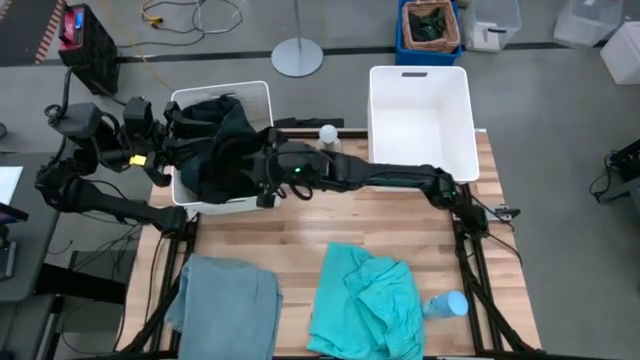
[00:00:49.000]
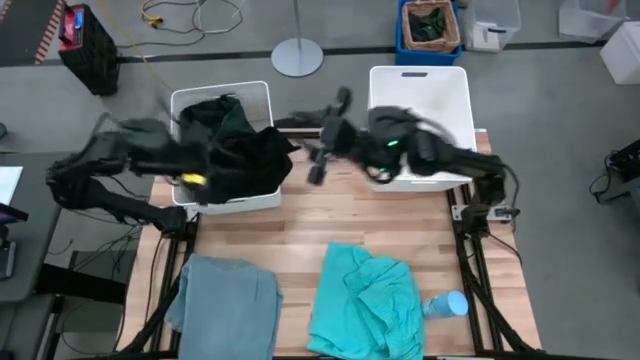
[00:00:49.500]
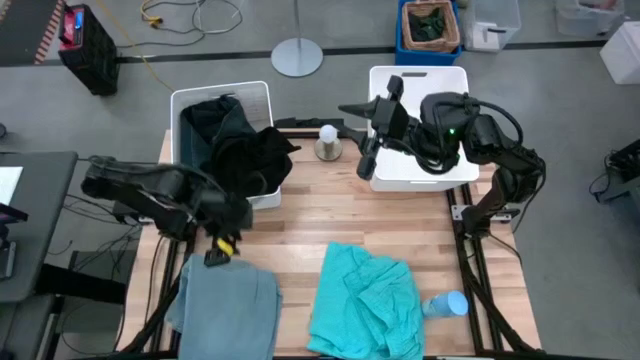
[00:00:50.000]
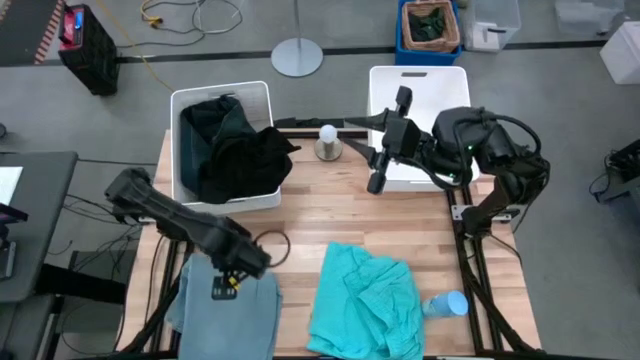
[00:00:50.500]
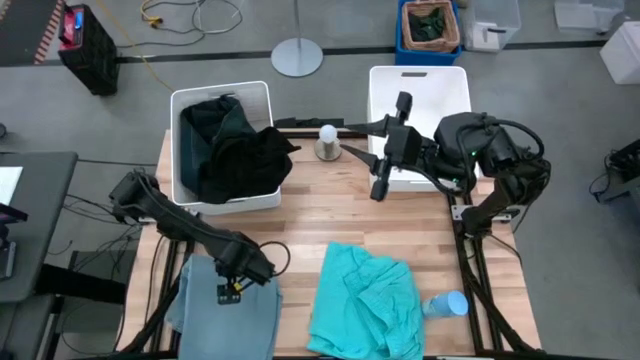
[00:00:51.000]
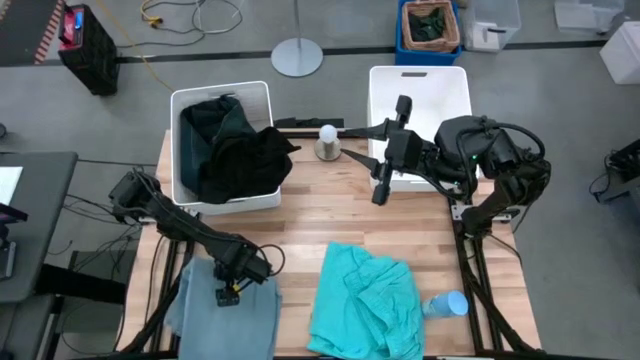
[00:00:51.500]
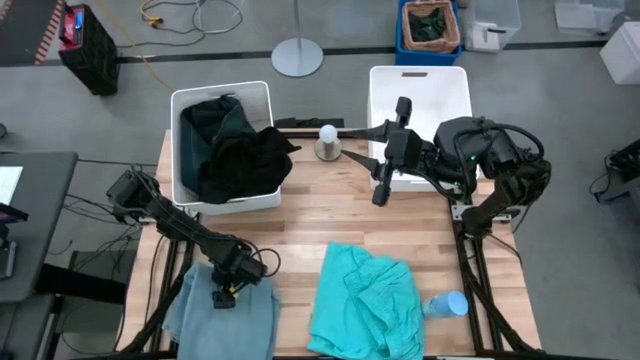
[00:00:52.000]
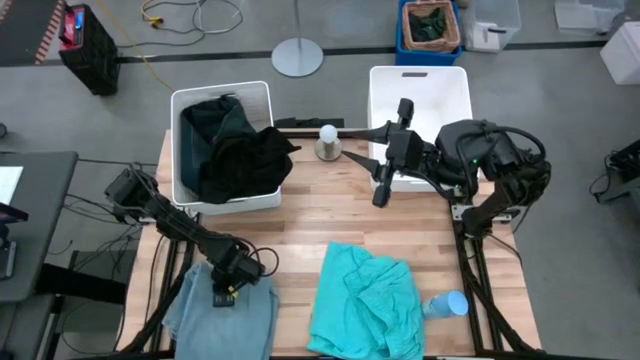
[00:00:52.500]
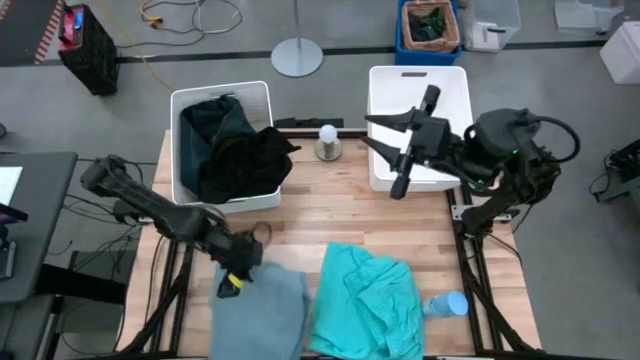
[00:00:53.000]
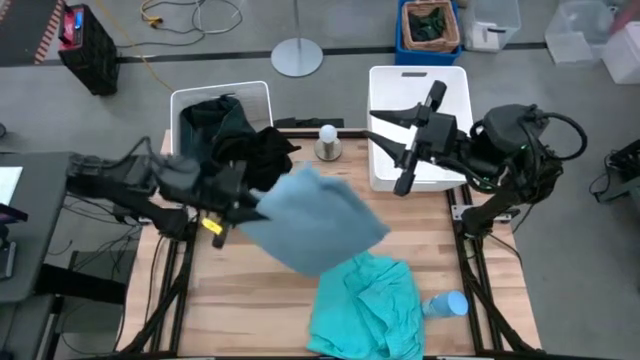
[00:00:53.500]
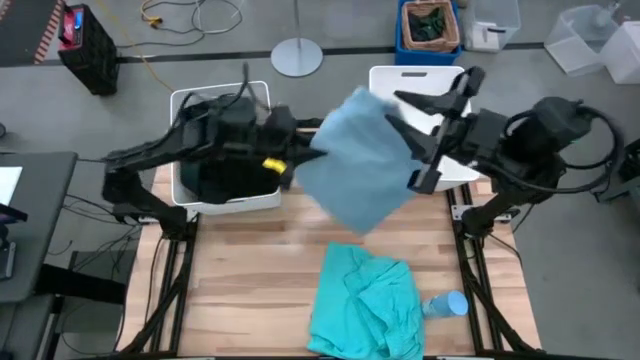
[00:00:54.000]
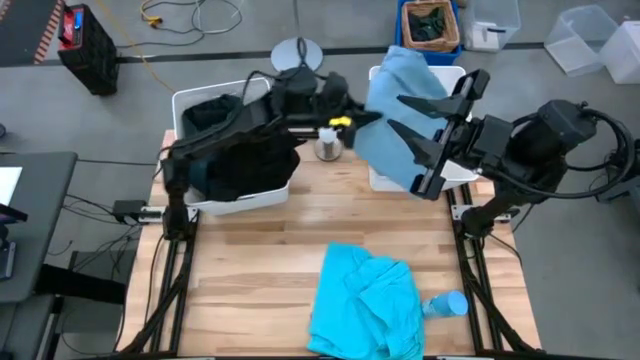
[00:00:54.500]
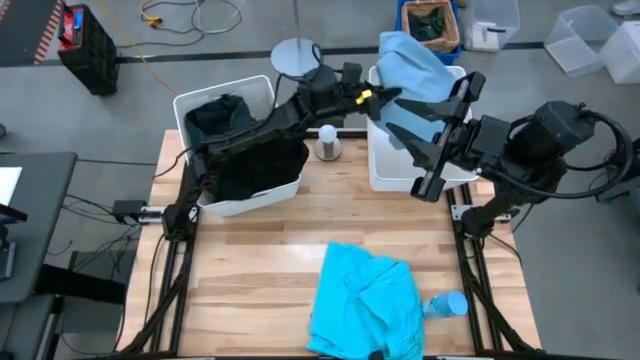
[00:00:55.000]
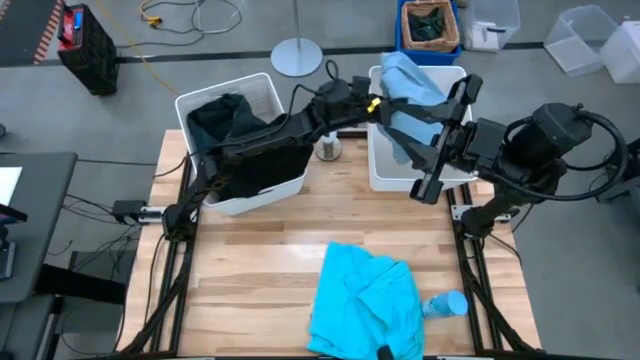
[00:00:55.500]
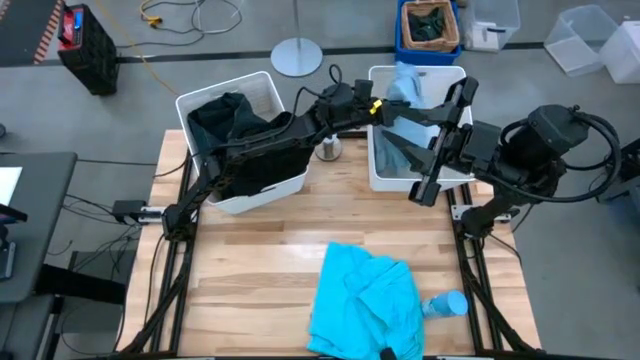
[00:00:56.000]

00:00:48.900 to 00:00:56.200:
Task: Sort clothes
Put the blue pants into the right white laundry bin

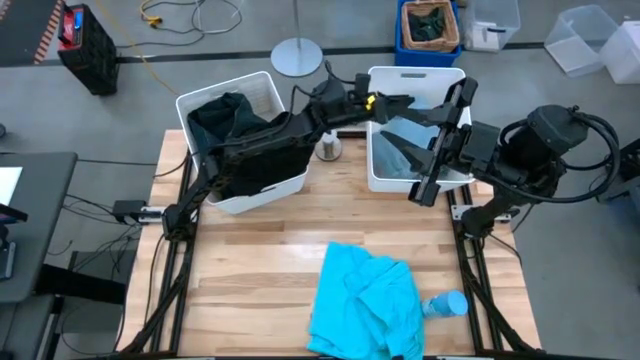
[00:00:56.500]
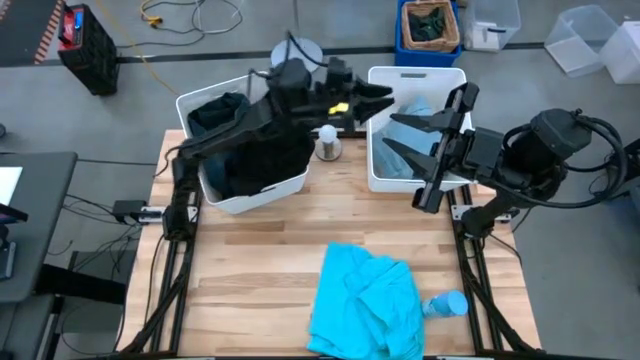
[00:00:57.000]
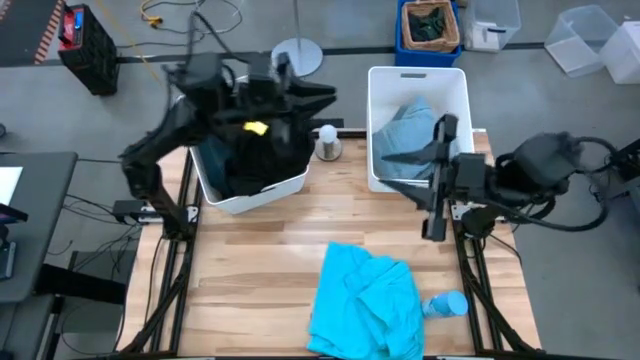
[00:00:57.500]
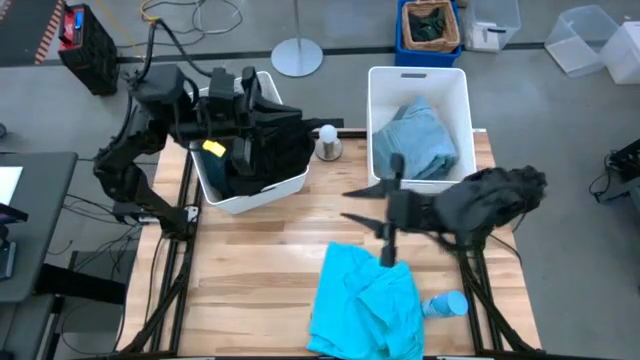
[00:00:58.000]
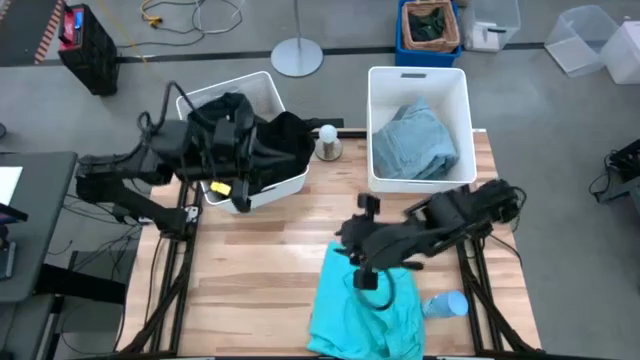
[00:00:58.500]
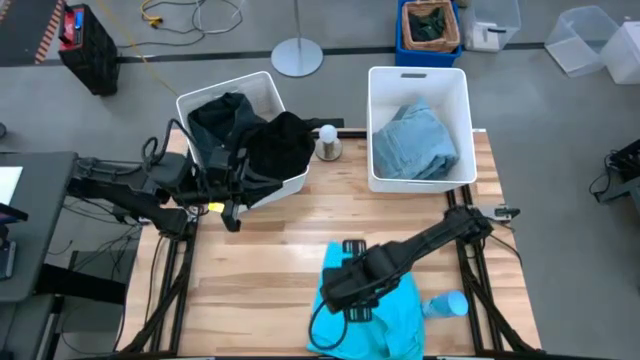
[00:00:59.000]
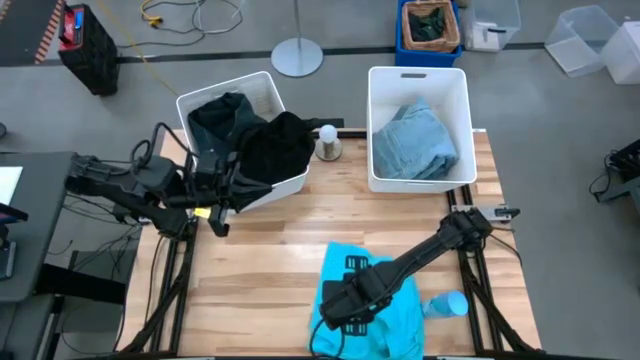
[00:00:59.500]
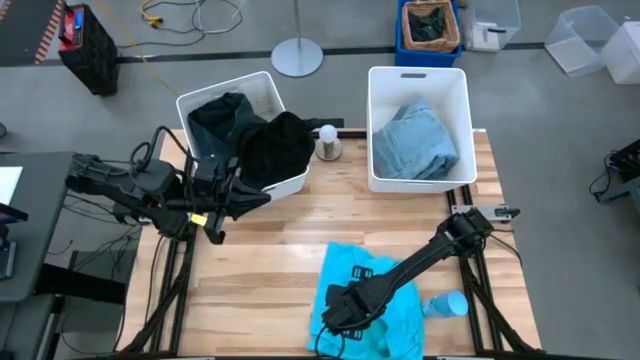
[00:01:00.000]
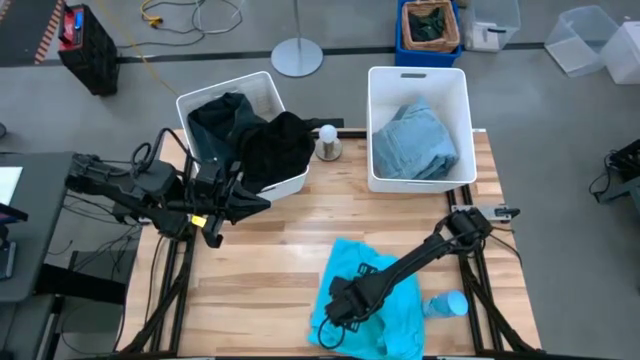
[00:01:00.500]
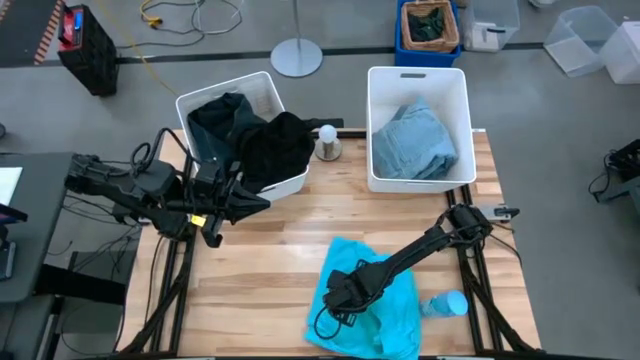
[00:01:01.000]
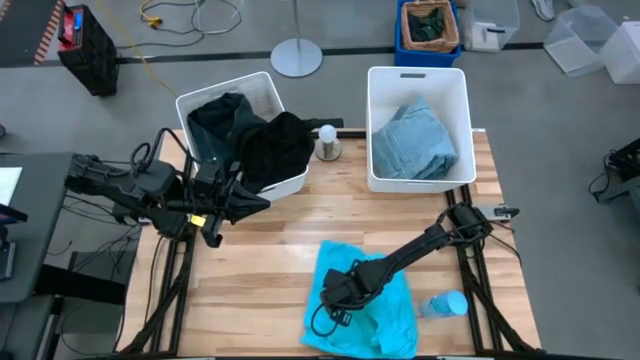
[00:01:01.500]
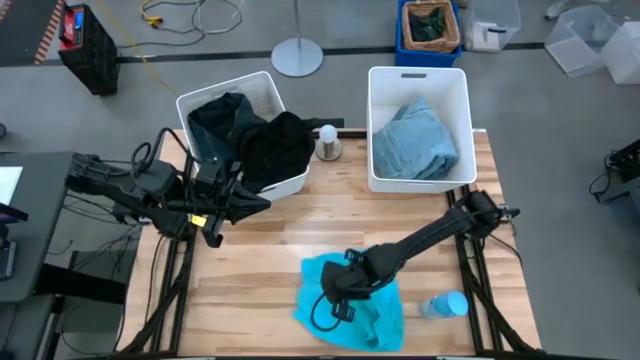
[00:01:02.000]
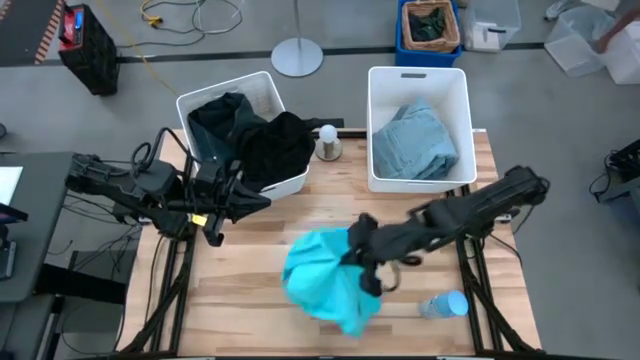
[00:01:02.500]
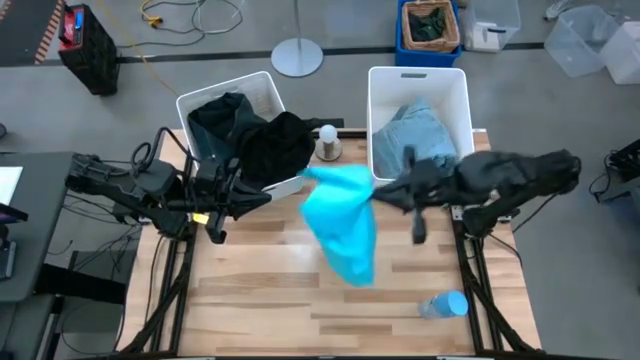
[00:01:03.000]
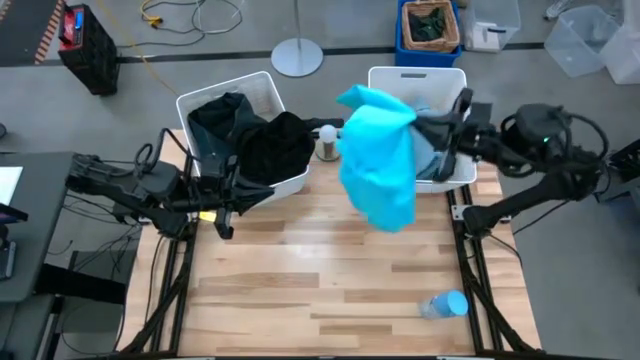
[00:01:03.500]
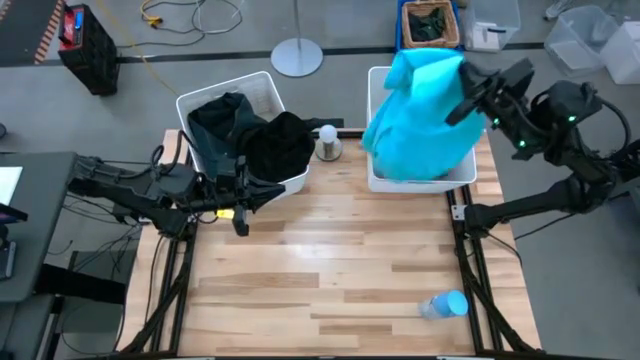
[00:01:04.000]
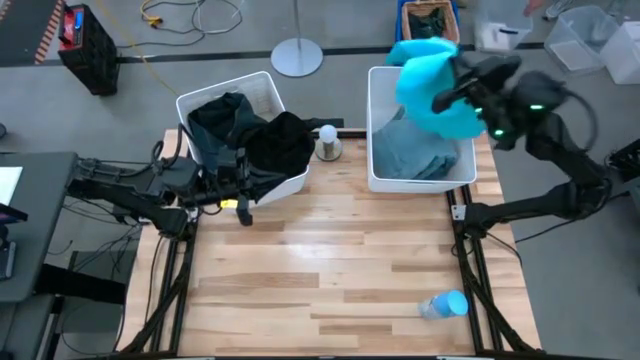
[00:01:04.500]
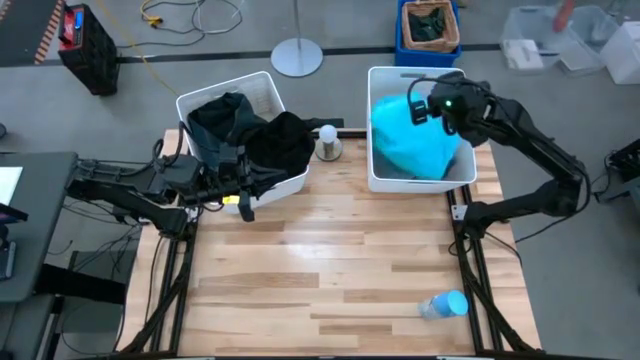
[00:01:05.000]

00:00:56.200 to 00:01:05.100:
Put the light blue shorts into the right white laundry bin

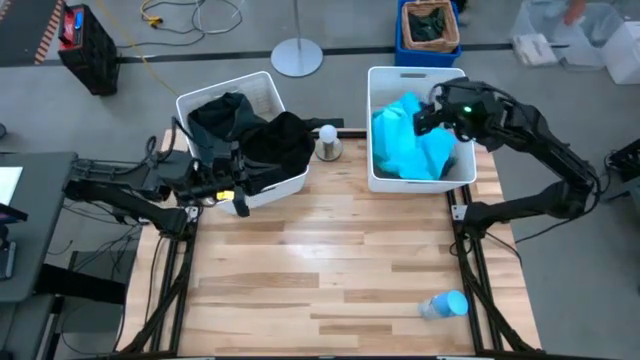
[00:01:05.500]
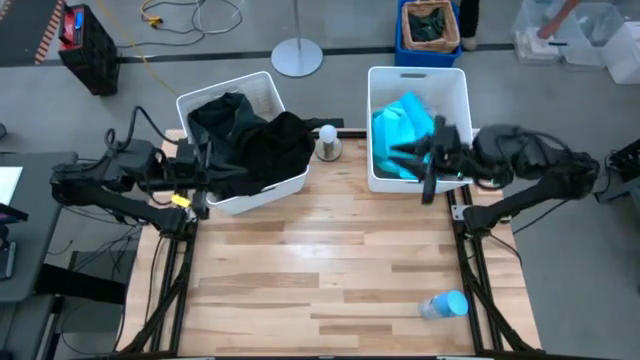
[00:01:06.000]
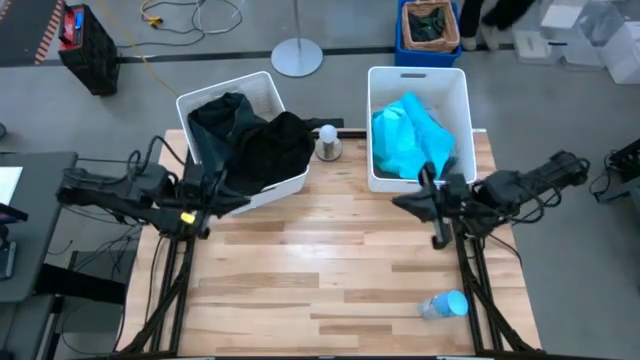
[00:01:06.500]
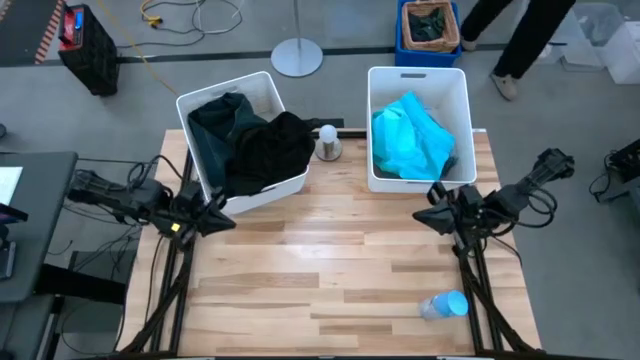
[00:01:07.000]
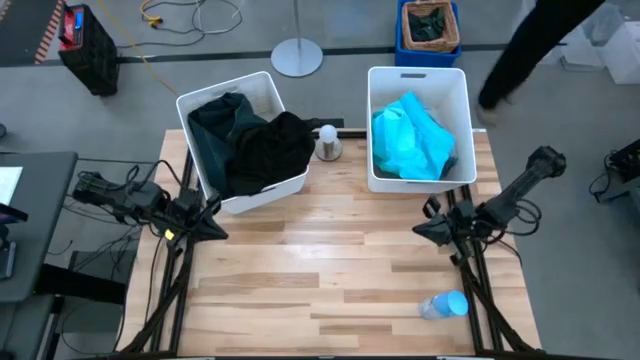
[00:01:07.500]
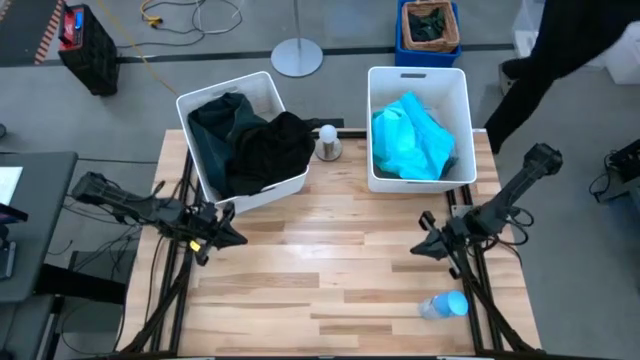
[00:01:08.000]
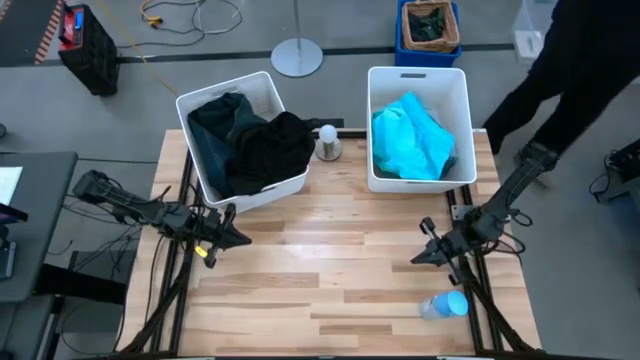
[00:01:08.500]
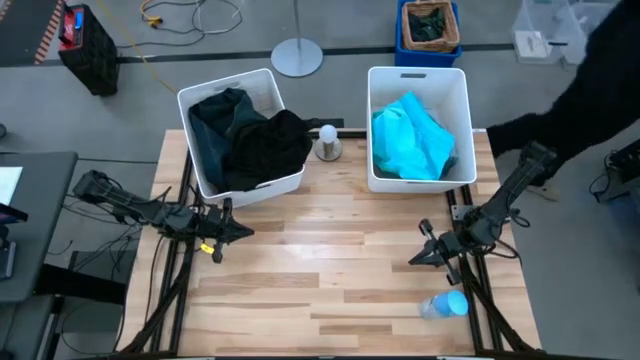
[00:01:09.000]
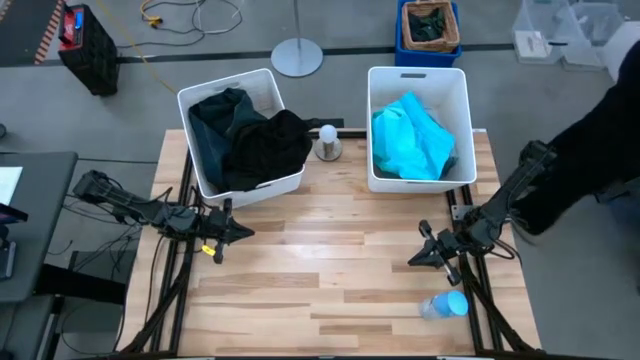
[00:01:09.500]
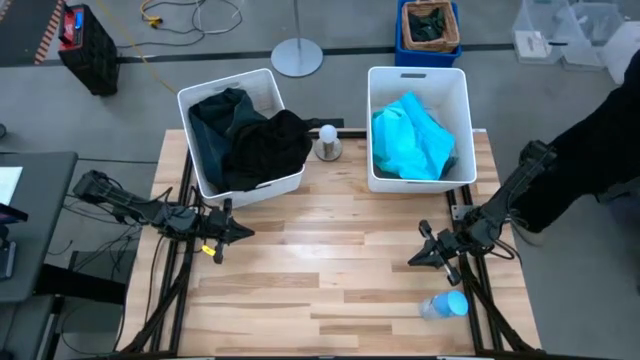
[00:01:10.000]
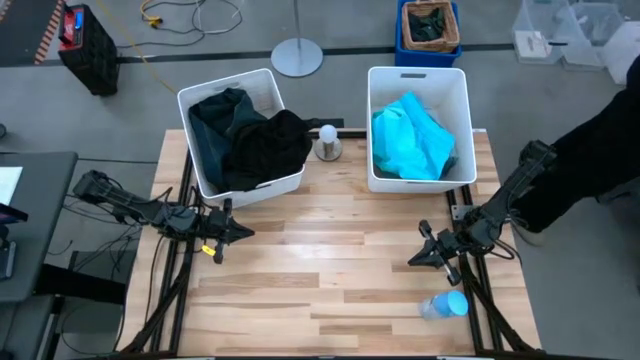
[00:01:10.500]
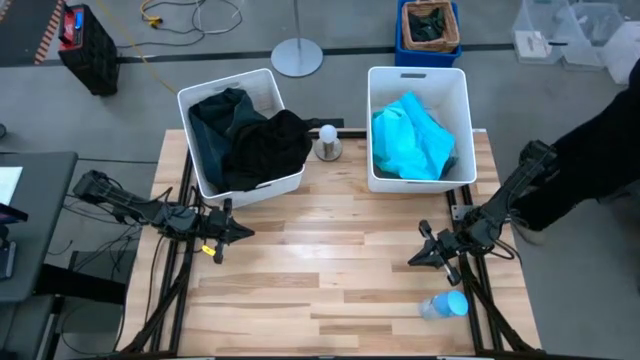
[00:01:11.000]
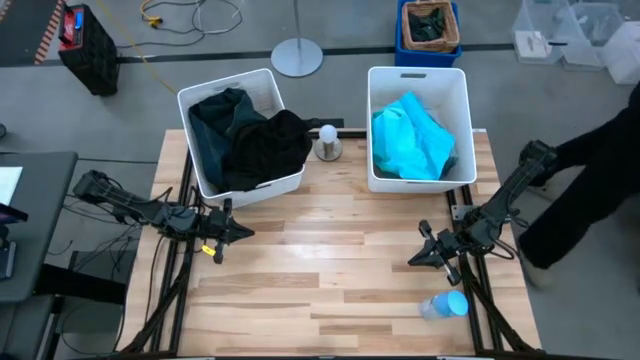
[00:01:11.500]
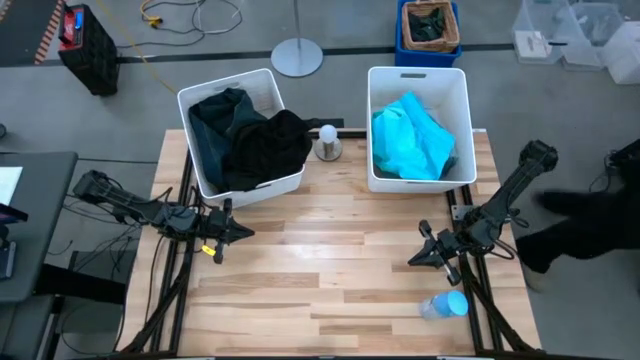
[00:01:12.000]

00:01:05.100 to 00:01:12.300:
Return to Home Position
